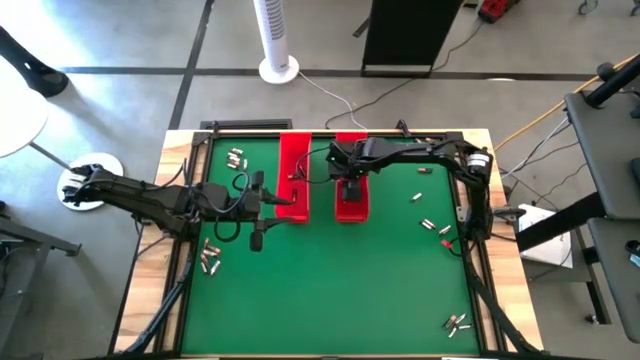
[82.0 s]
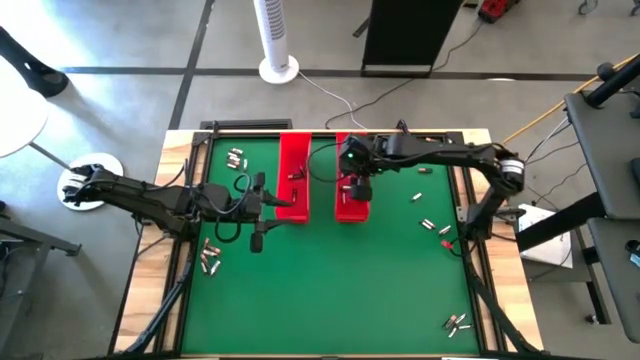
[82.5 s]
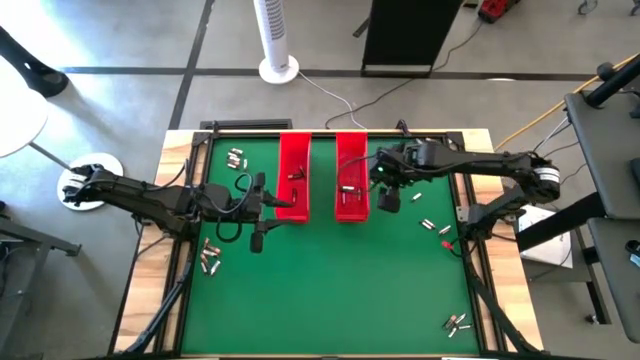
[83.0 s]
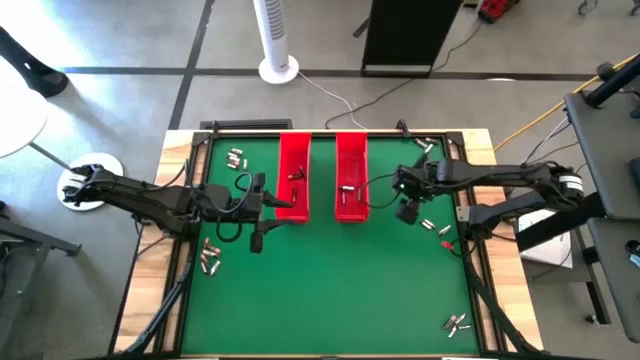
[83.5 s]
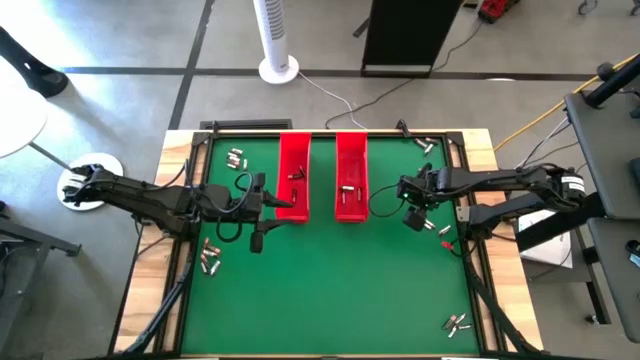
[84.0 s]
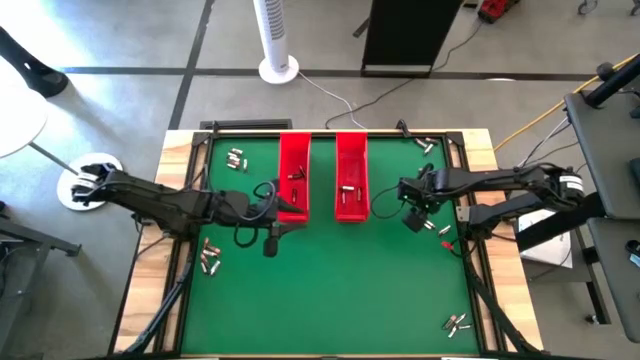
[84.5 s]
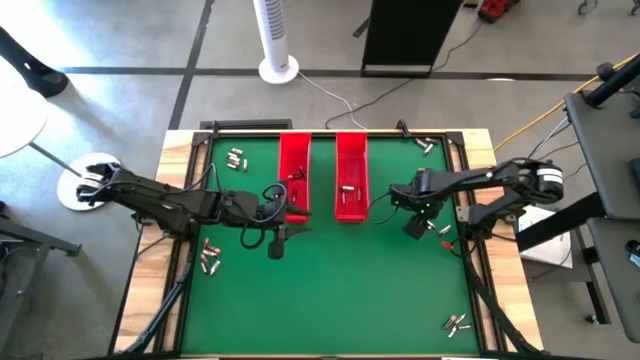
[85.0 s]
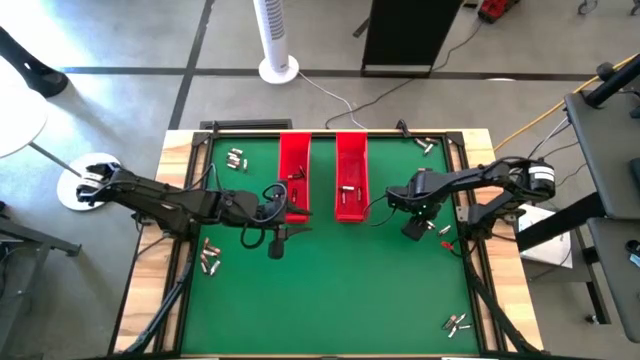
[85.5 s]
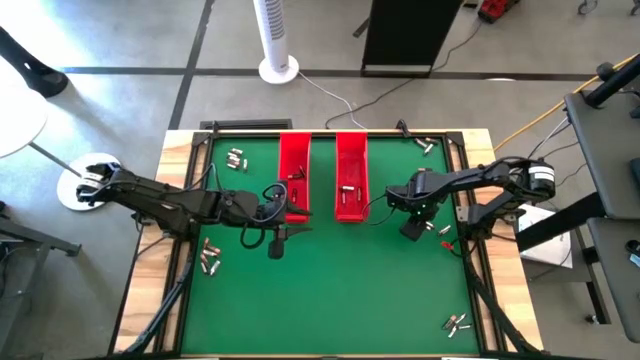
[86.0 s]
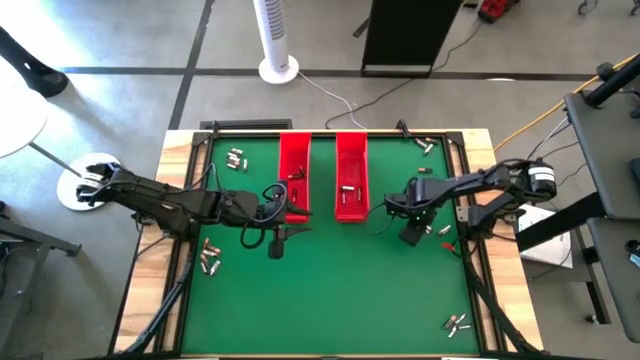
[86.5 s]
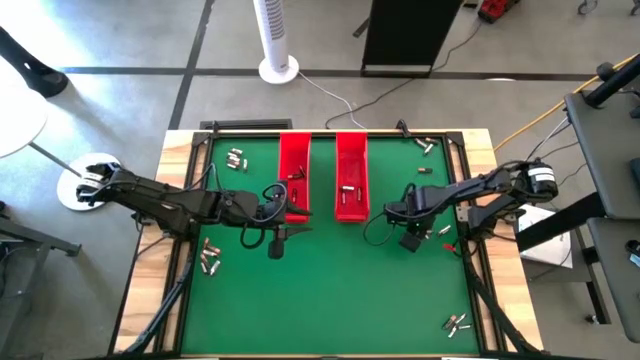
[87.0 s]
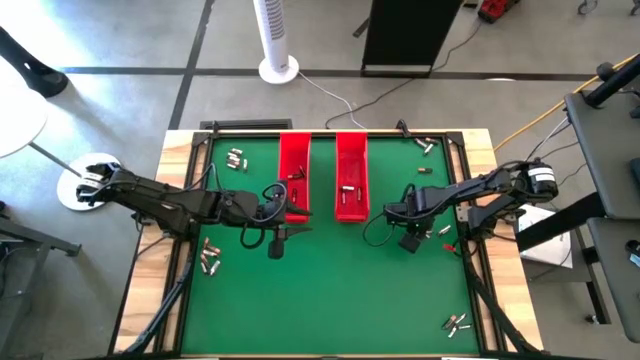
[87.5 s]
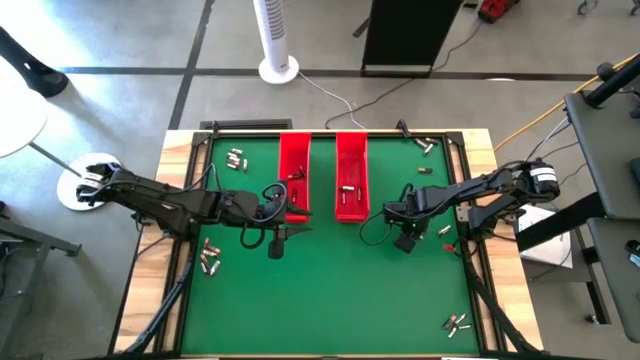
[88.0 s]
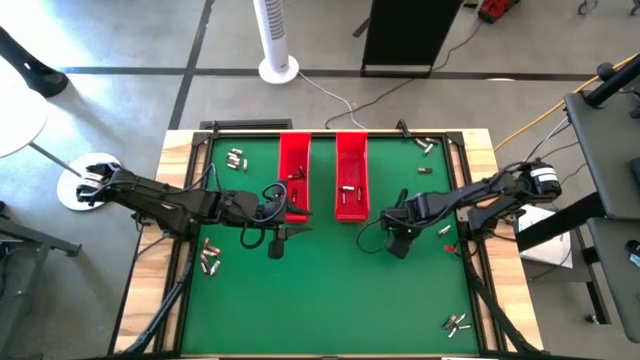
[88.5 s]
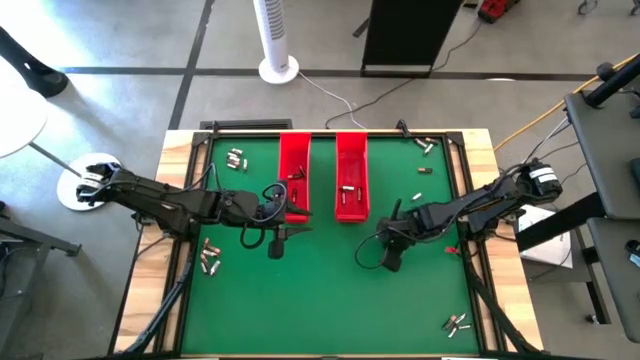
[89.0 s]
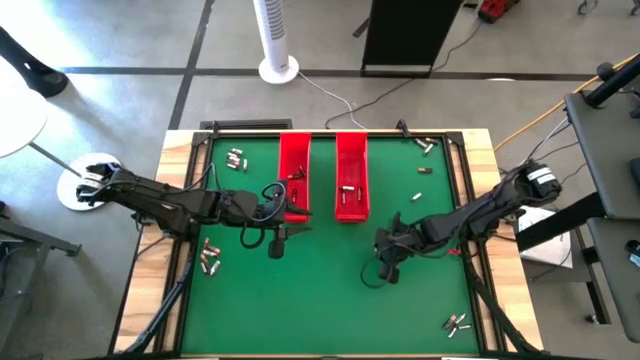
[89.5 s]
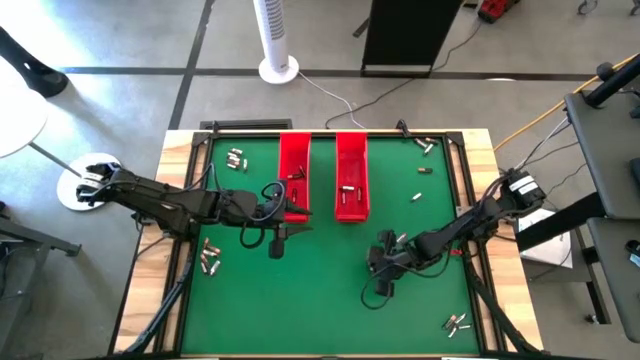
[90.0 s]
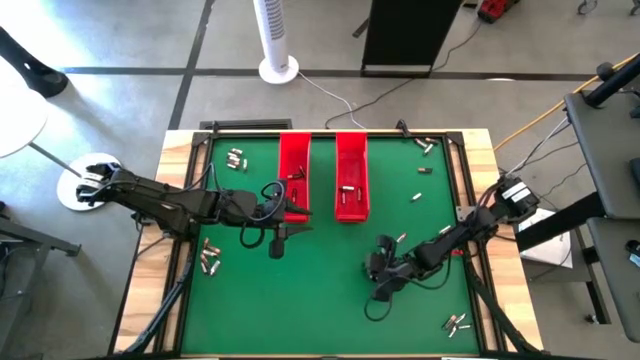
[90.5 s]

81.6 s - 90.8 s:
Task: Sort batteries
Put the silver battery into the right red bin

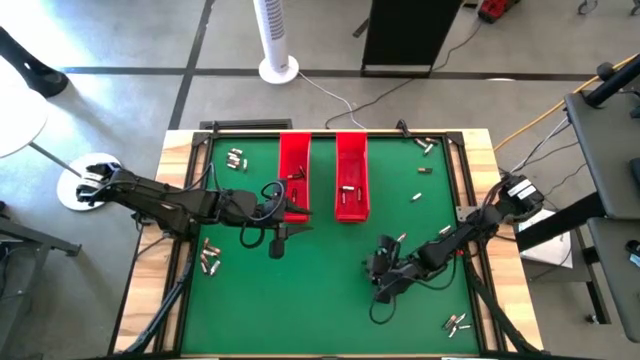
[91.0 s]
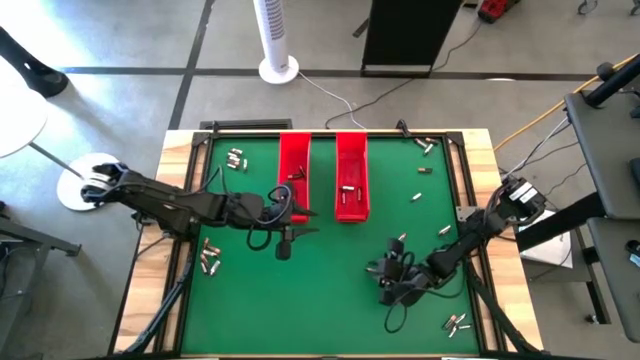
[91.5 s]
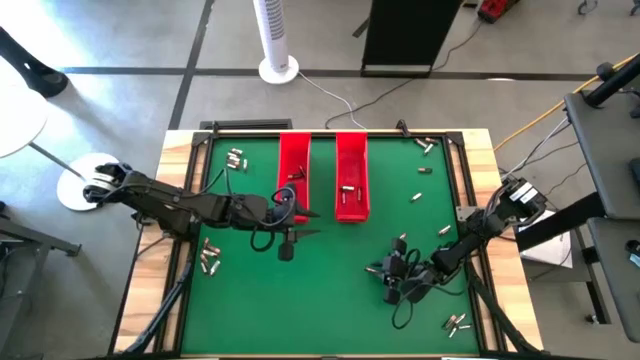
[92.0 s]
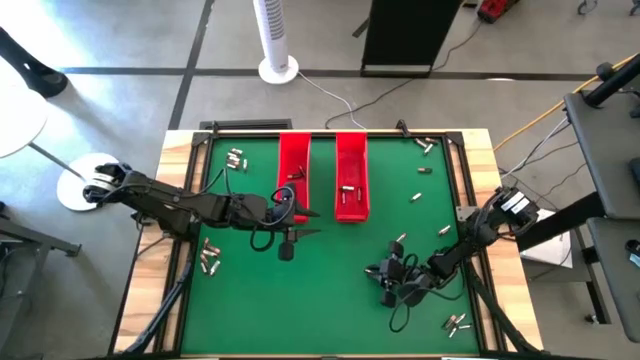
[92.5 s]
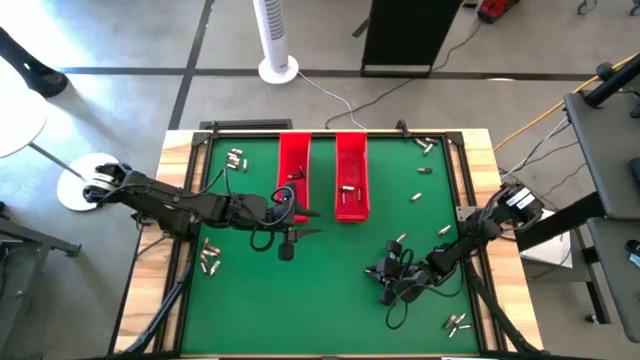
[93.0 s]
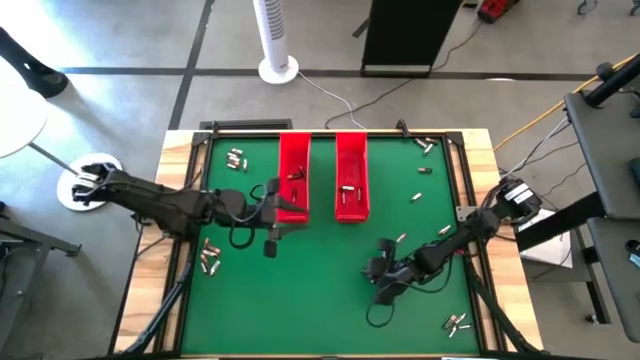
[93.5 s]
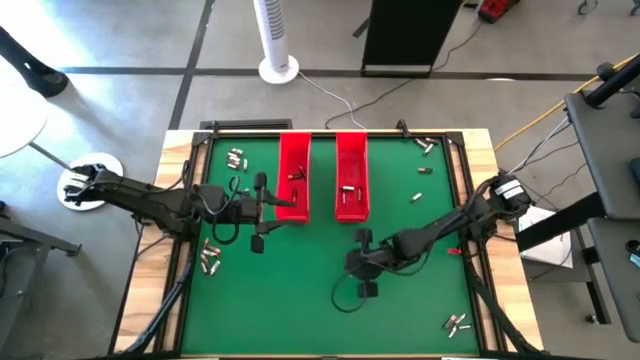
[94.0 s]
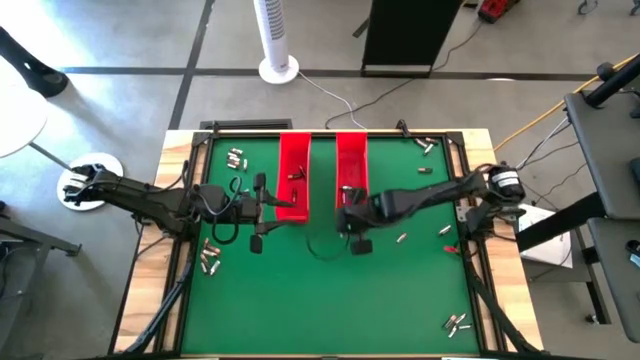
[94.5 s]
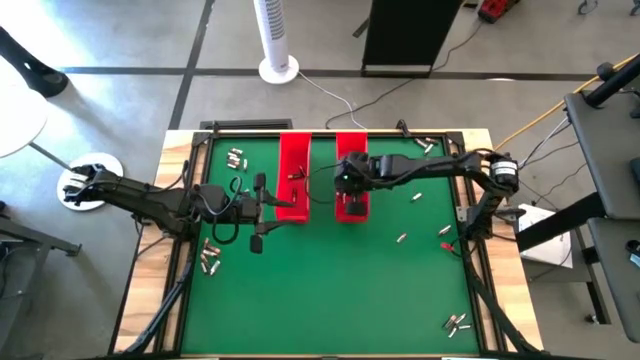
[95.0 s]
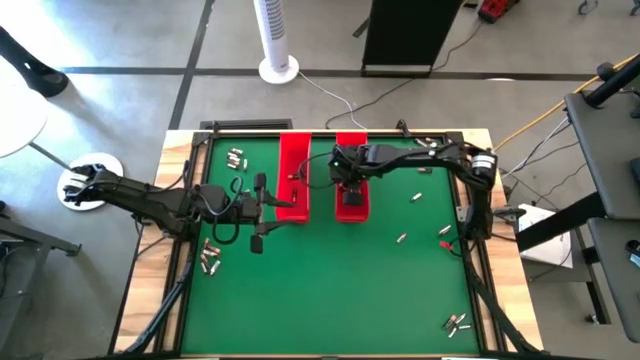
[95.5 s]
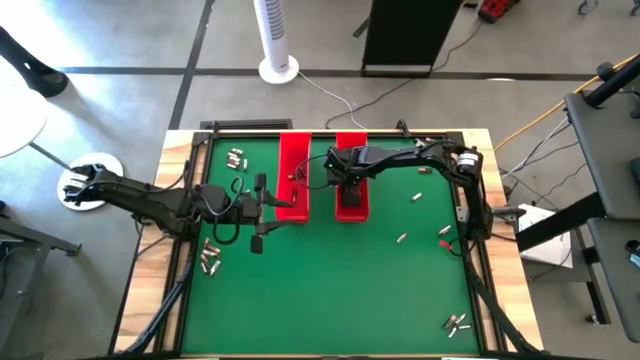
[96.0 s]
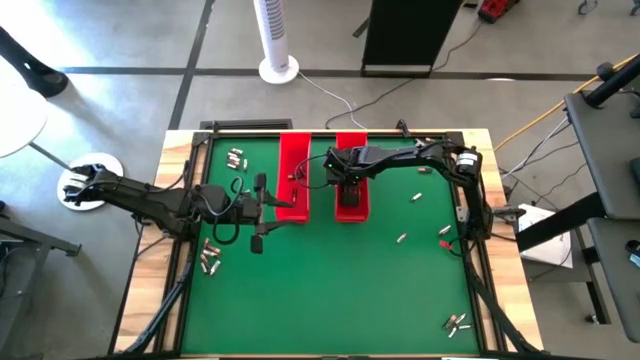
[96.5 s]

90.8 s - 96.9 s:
Put the silver battery into the right red bin

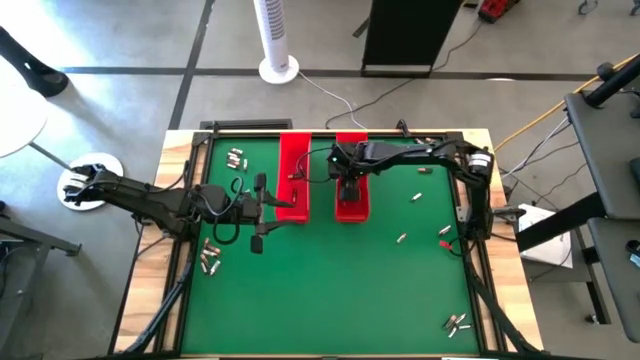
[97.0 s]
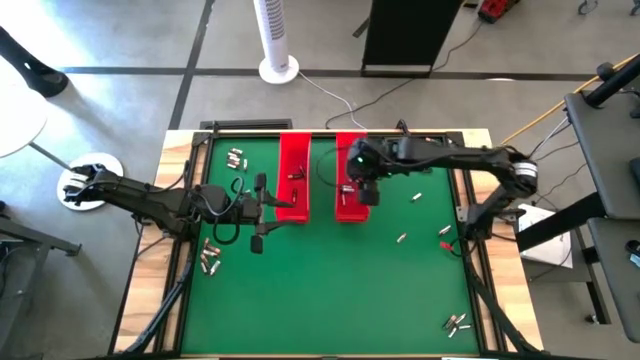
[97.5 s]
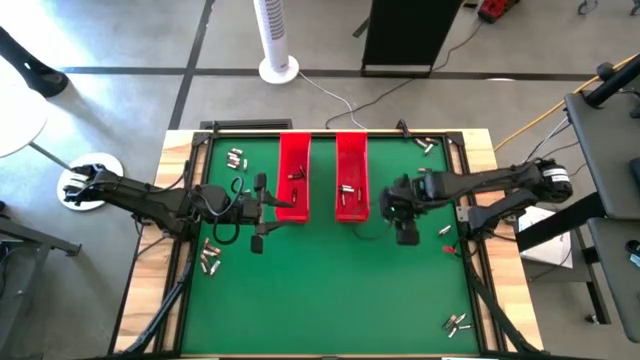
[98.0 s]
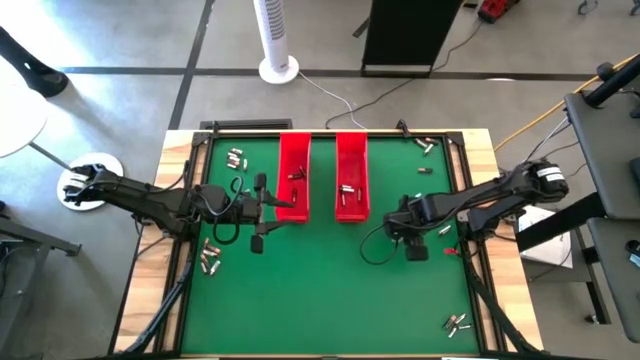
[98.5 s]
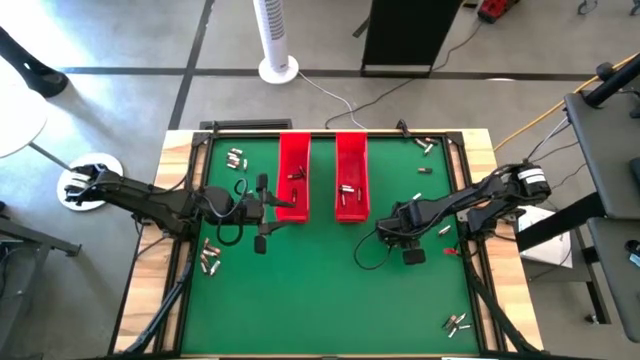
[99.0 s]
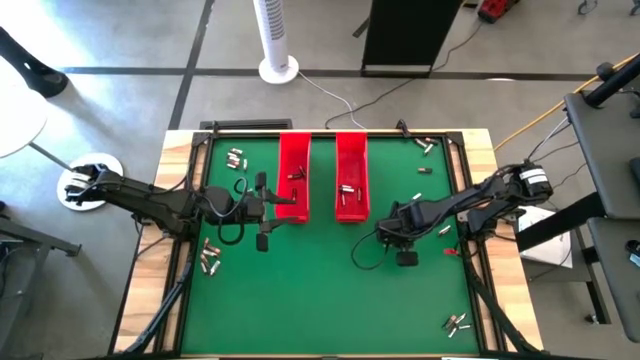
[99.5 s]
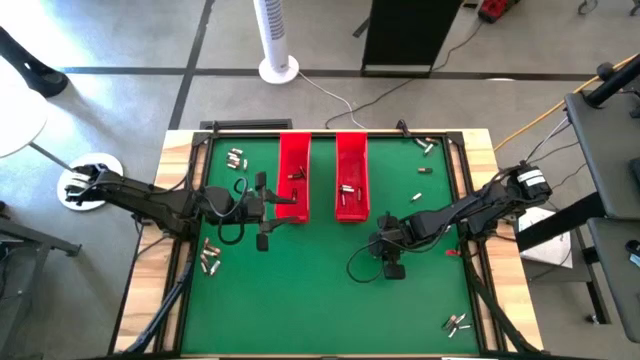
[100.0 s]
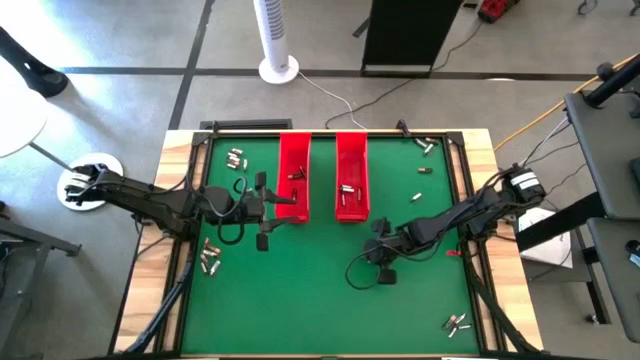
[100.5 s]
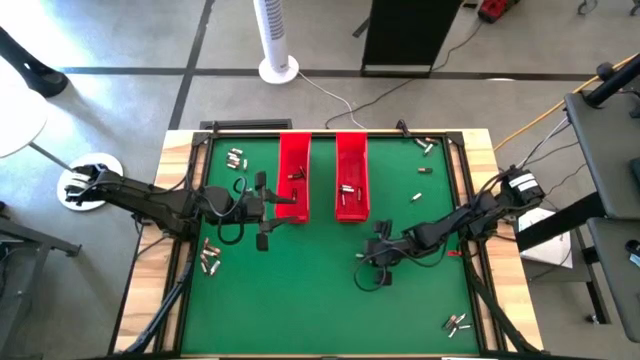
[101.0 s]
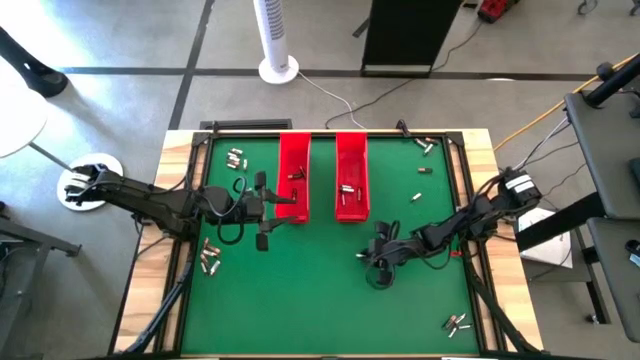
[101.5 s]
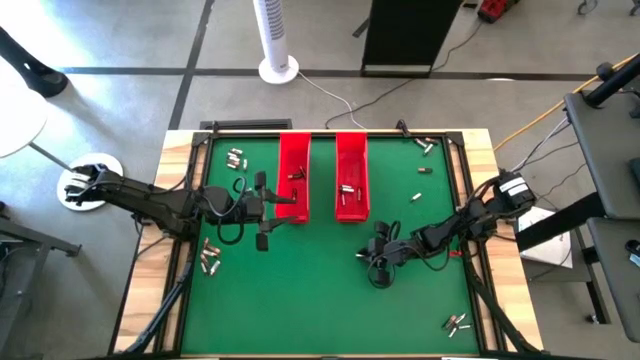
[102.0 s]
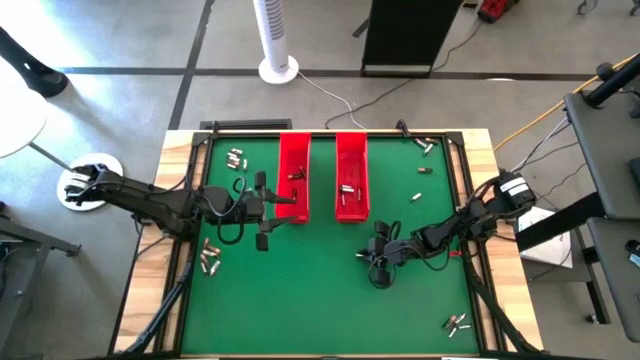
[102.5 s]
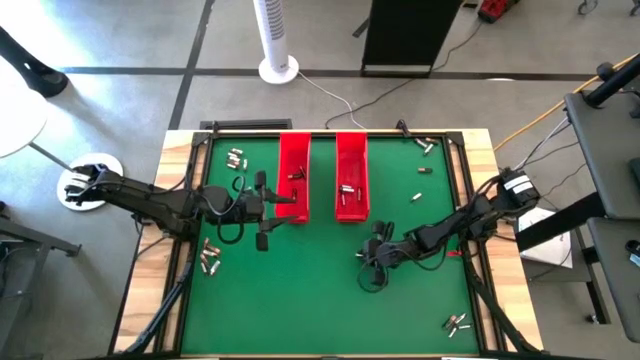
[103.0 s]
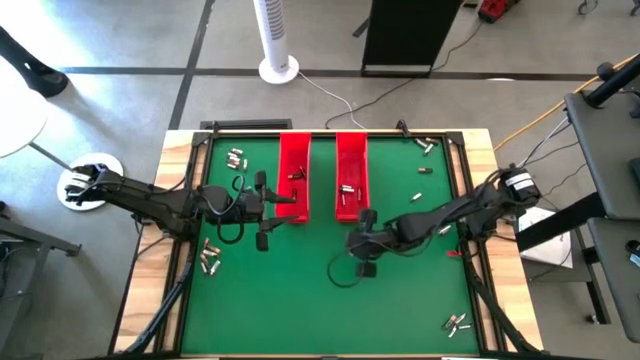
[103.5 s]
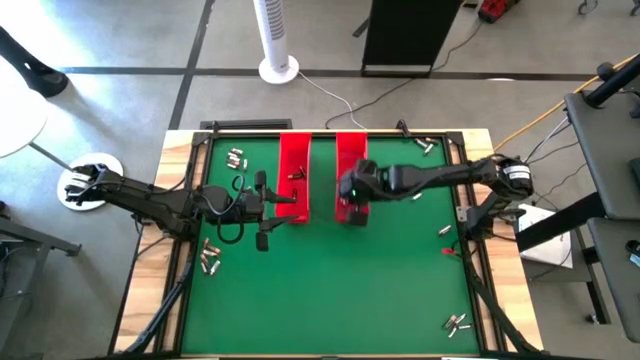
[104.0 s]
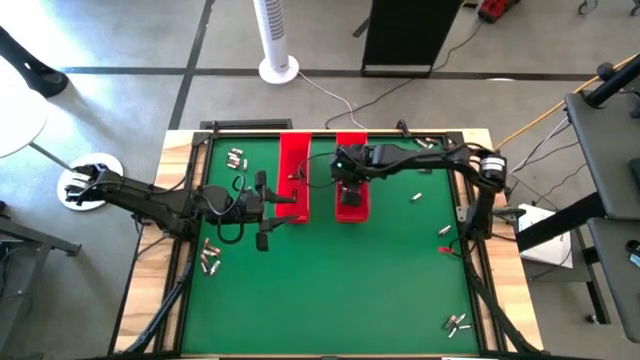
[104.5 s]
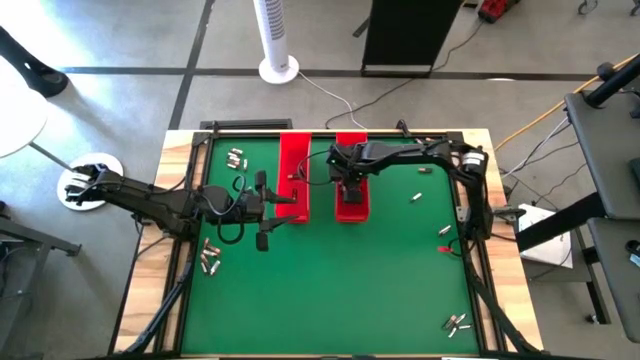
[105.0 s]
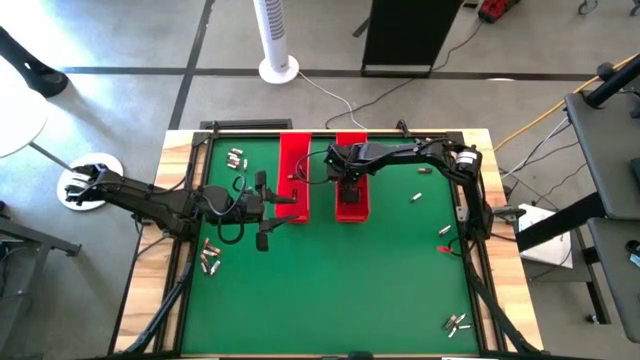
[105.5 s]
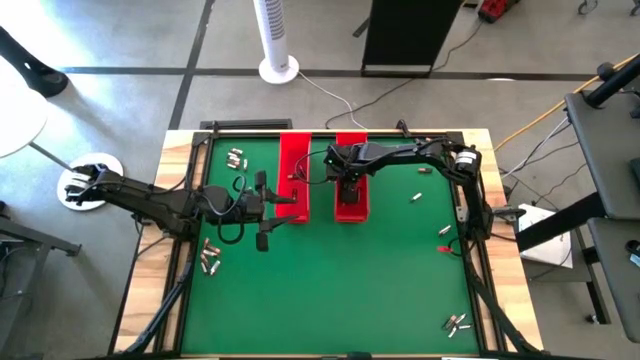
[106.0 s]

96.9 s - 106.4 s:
Put the silver battery into the right red bin
